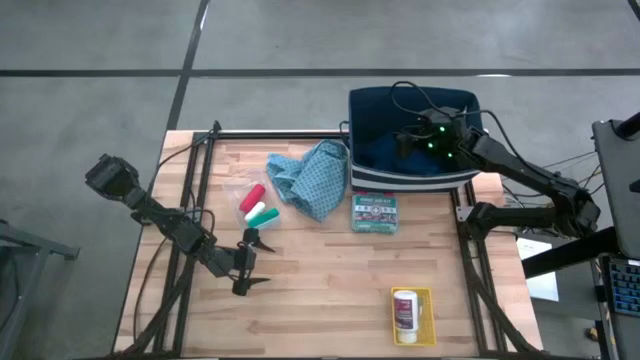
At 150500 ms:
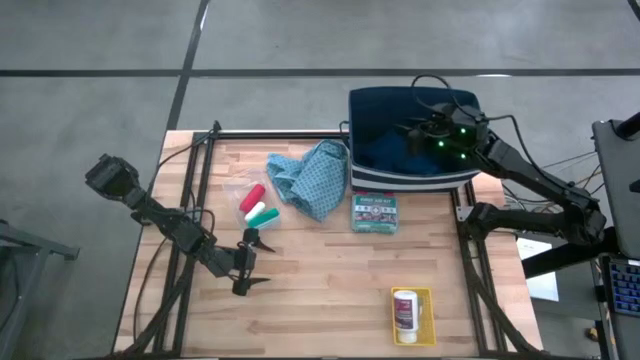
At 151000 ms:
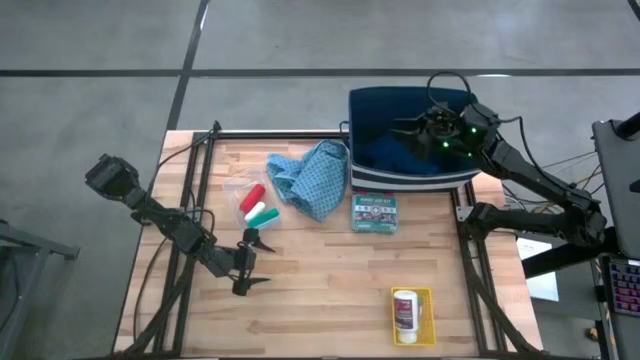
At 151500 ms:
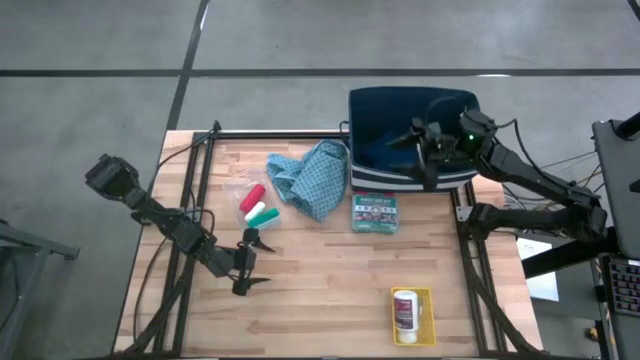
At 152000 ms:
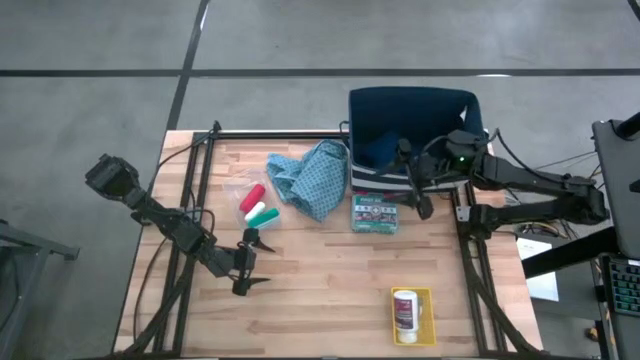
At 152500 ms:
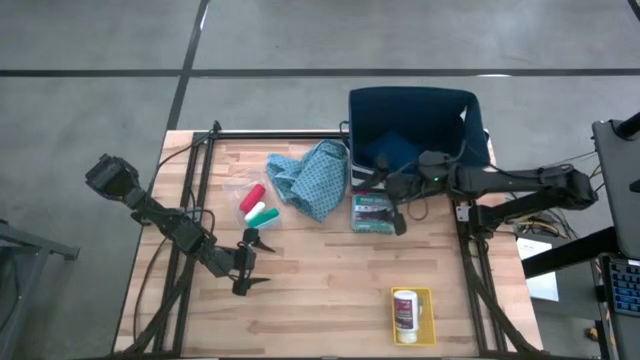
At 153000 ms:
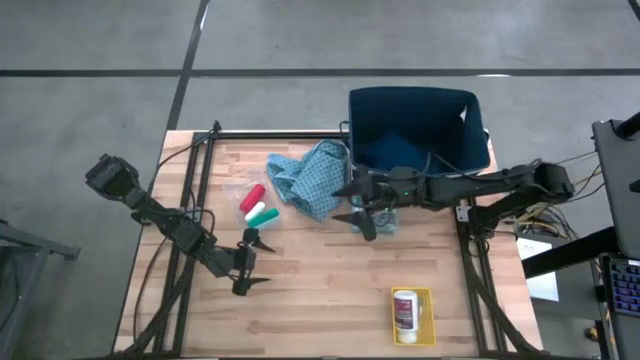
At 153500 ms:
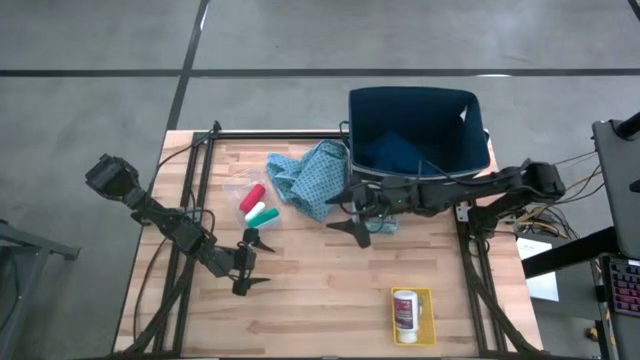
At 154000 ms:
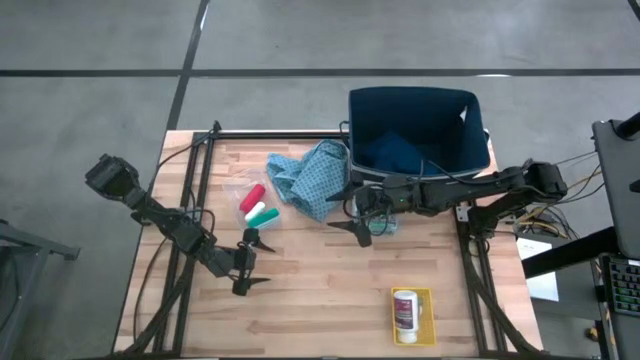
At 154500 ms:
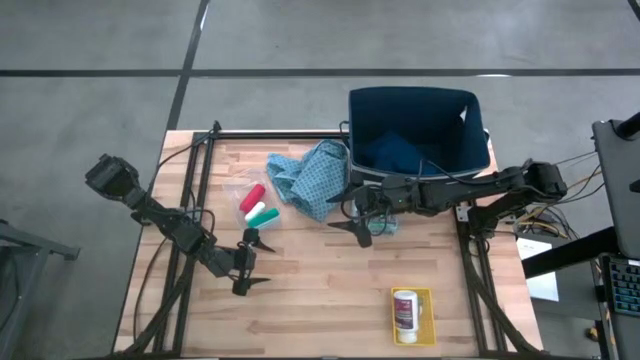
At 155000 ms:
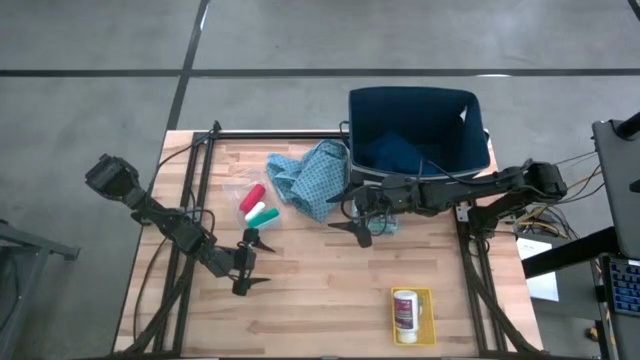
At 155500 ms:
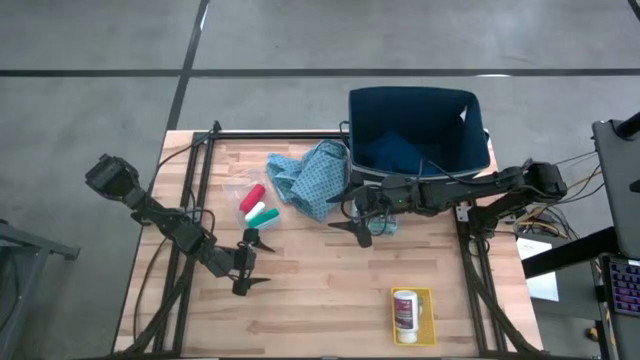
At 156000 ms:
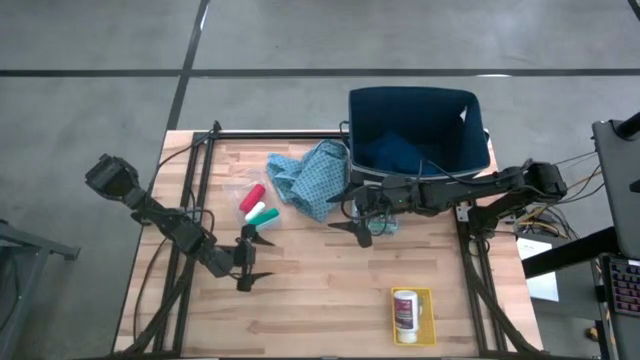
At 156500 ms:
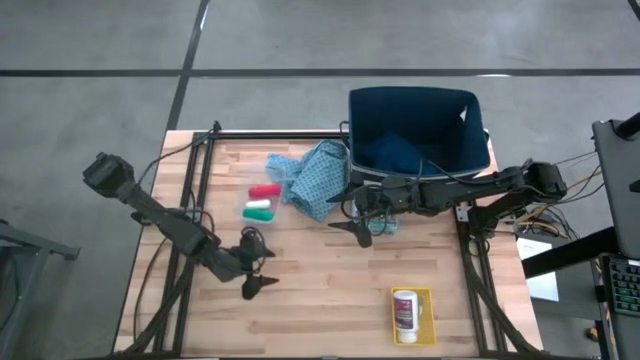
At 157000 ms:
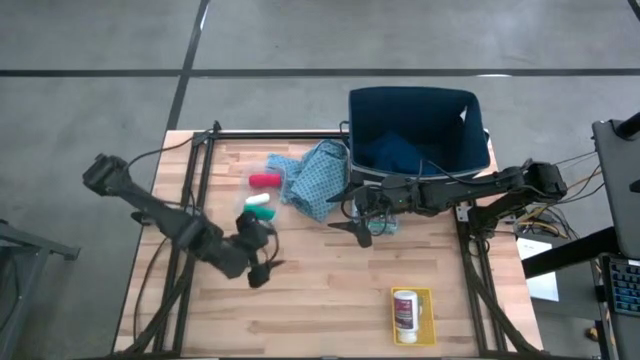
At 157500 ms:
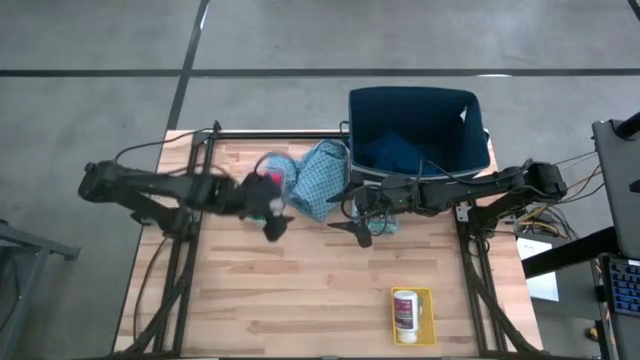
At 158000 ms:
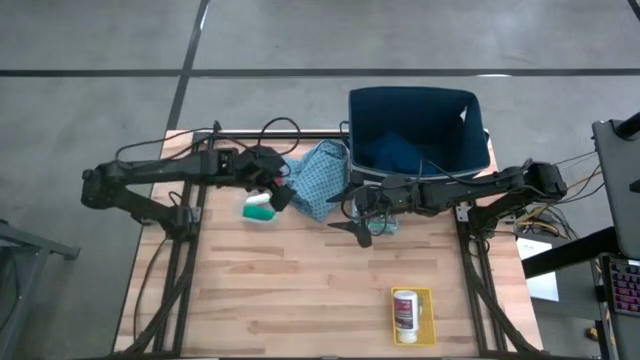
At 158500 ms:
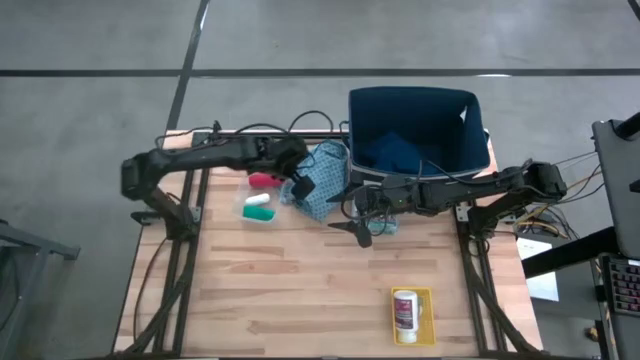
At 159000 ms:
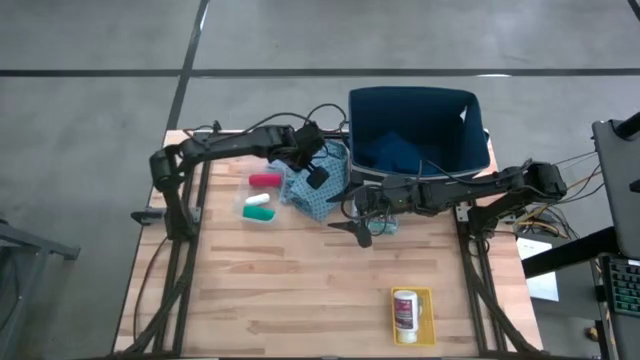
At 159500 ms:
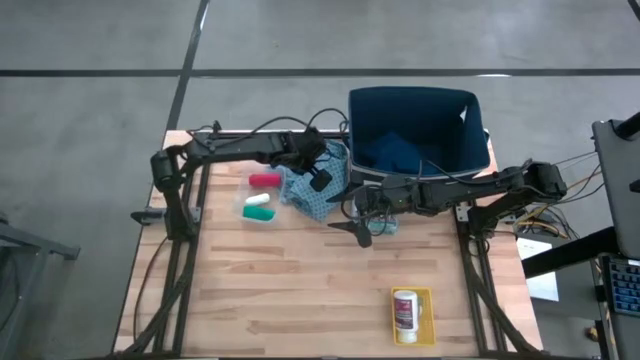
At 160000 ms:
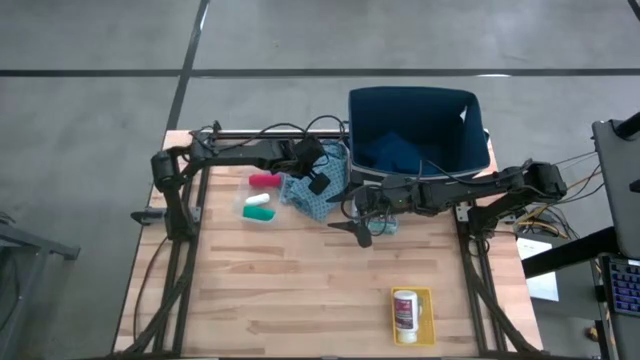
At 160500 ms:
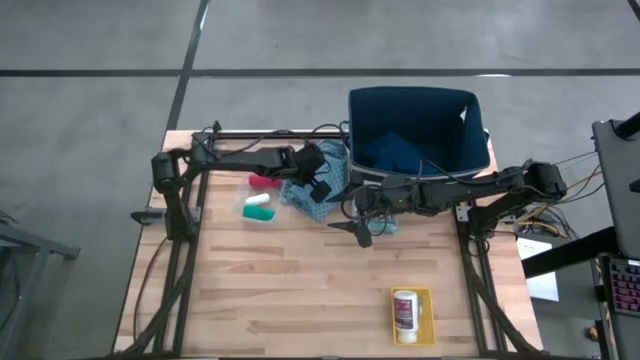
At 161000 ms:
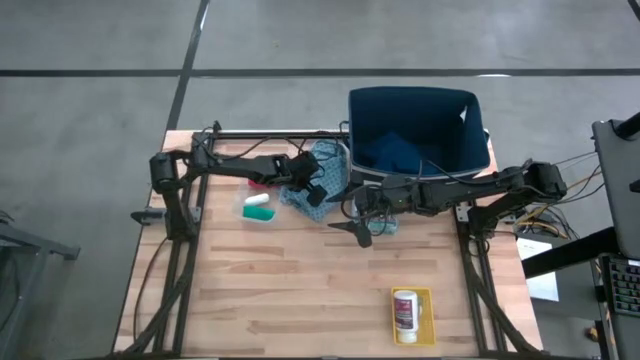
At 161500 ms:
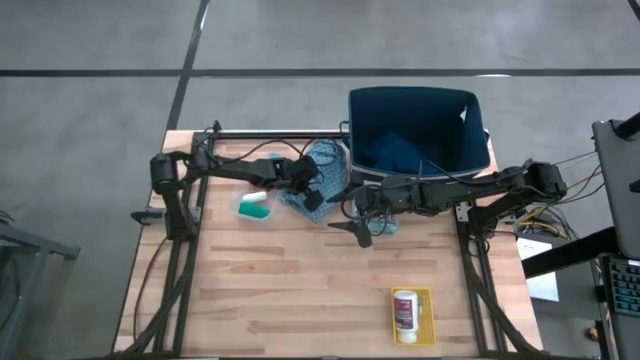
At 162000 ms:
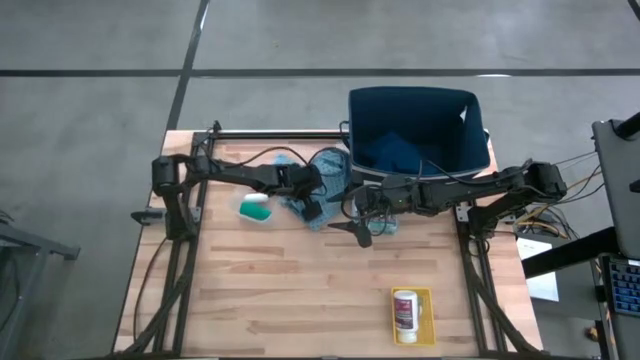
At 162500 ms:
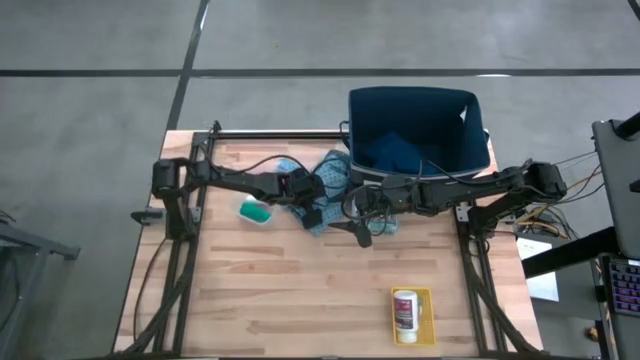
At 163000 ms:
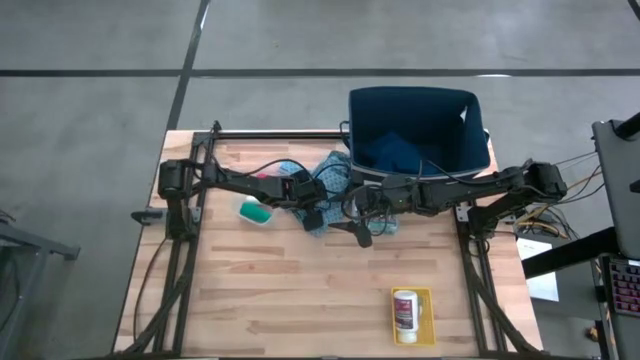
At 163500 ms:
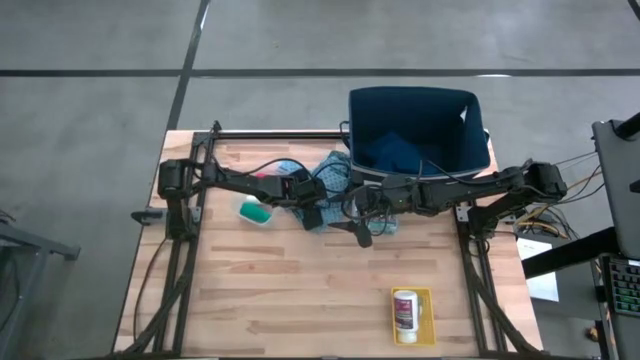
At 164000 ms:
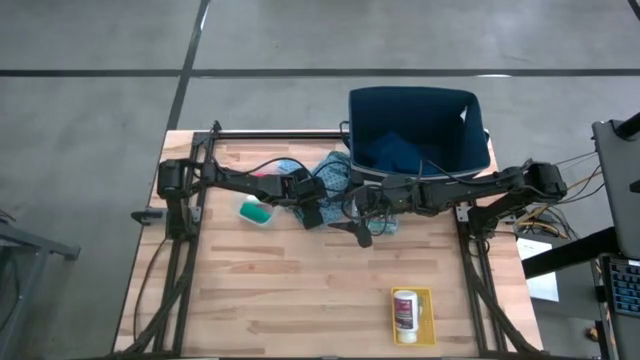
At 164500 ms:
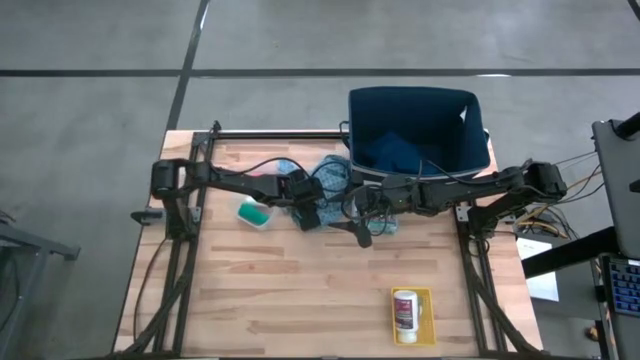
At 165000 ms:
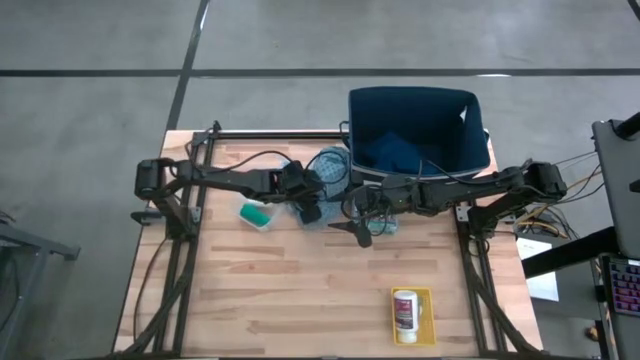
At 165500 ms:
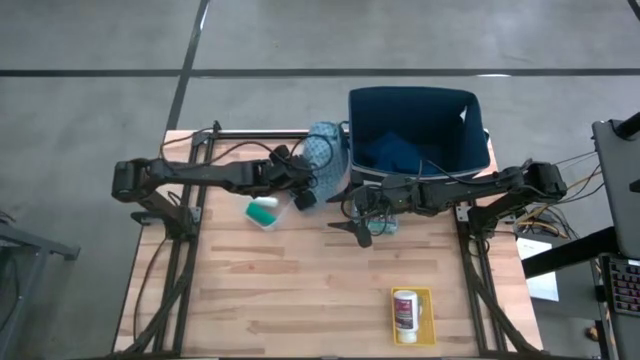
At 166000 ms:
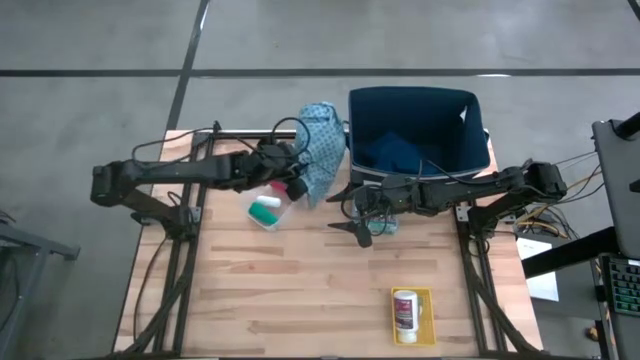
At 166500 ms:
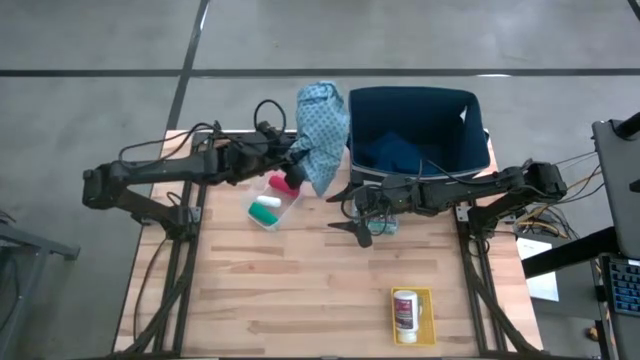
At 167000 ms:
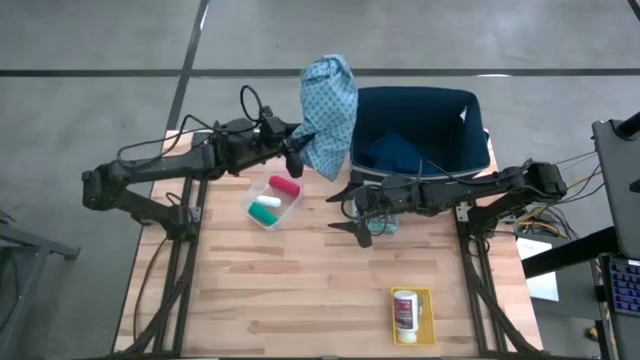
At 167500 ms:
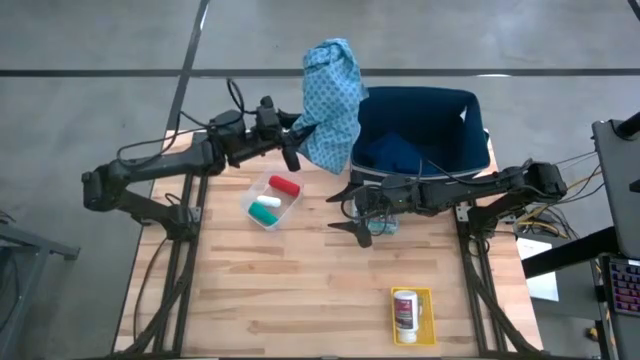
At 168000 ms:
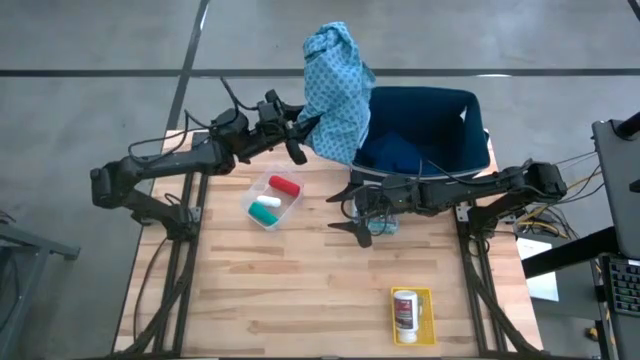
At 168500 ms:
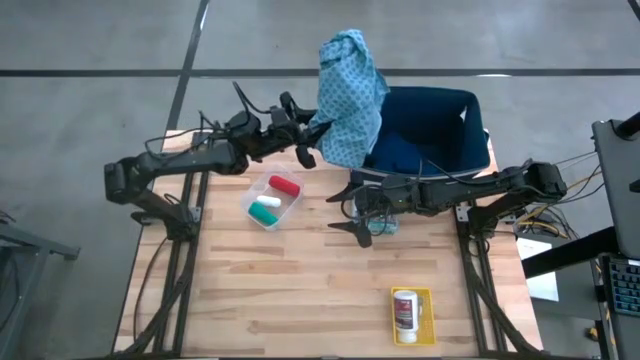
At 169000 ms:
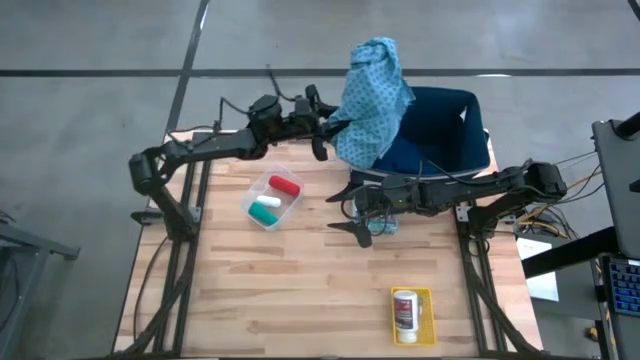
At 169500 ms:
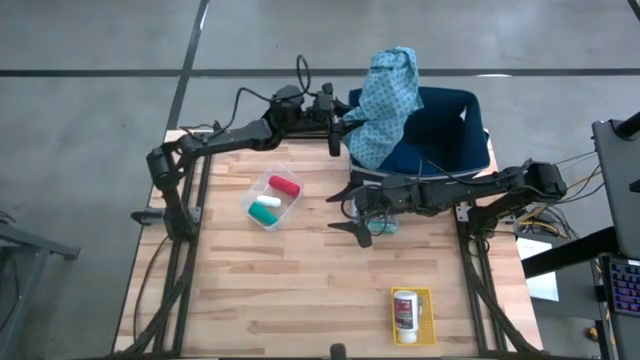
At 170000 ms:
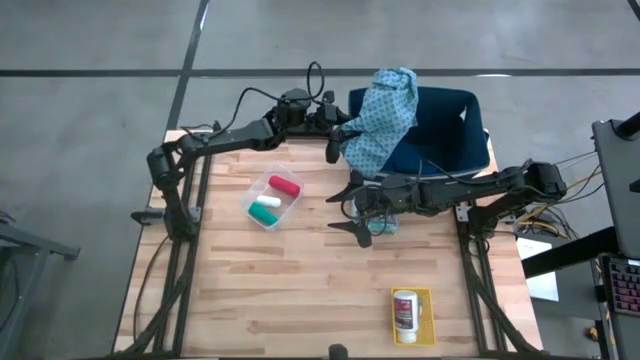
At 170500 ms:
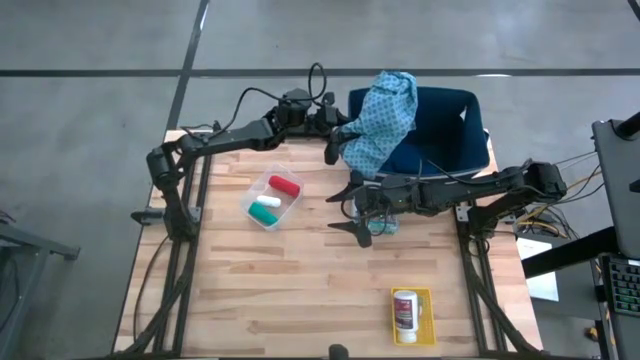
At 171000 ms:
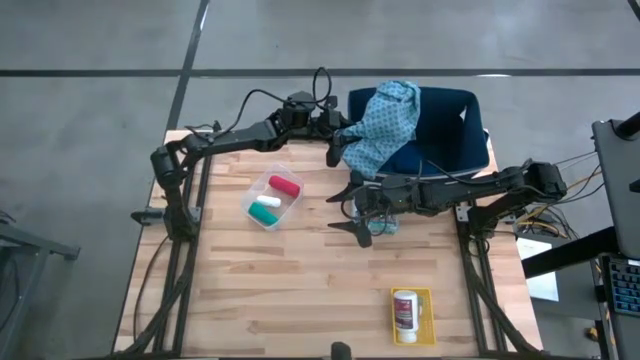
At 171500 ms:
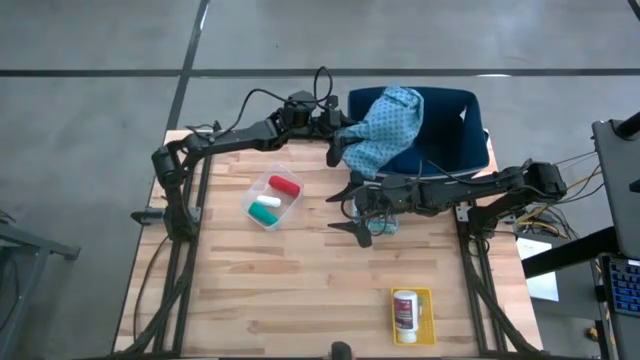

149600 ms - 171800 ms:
Task: Pick & place medical supplies in basket/bin
Put the light blue patient gown into the blue bin
